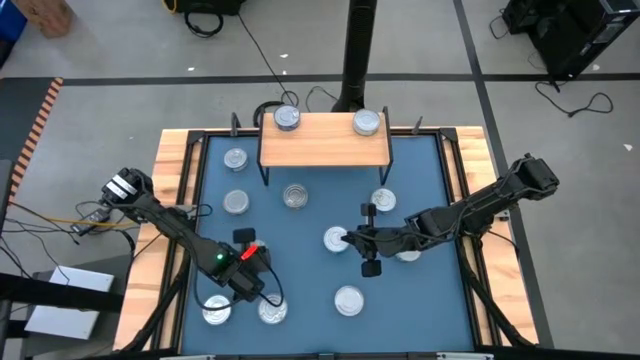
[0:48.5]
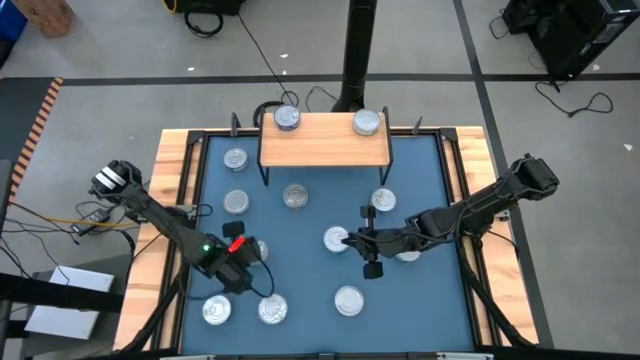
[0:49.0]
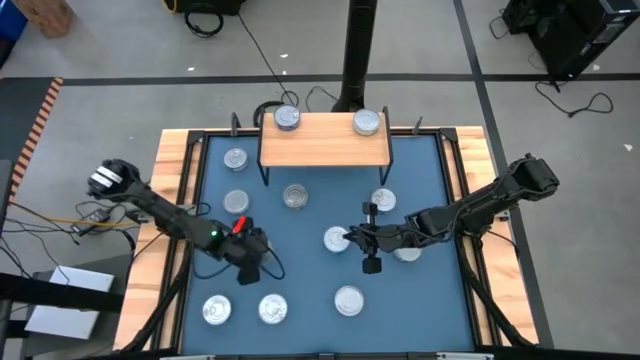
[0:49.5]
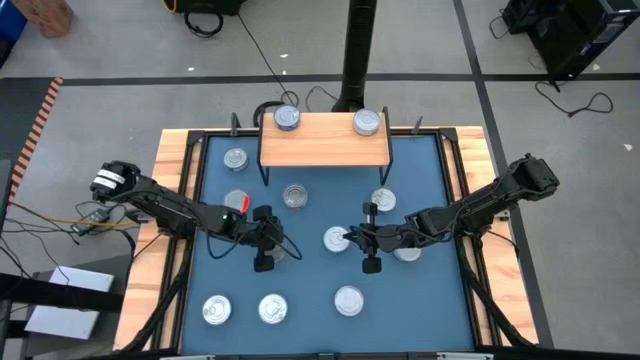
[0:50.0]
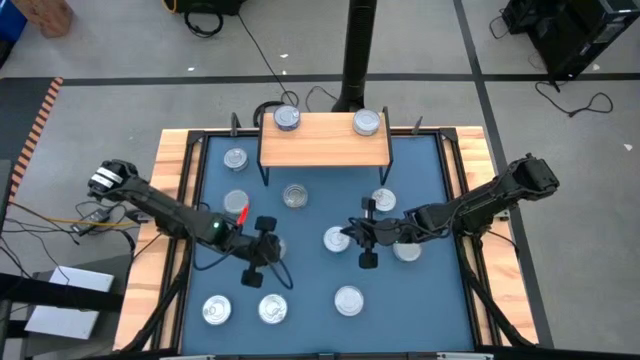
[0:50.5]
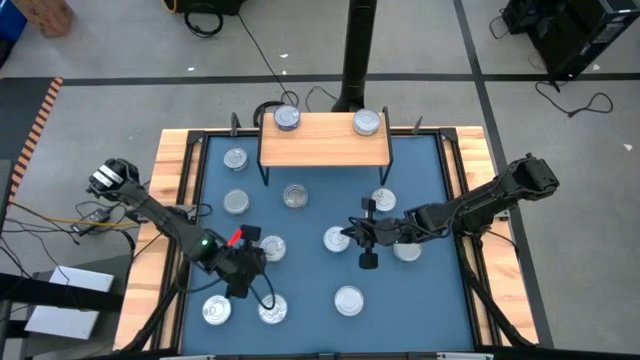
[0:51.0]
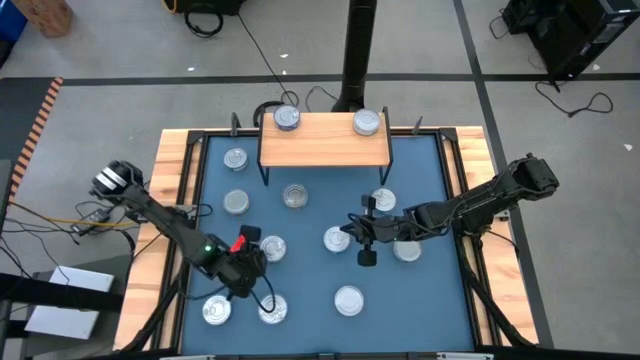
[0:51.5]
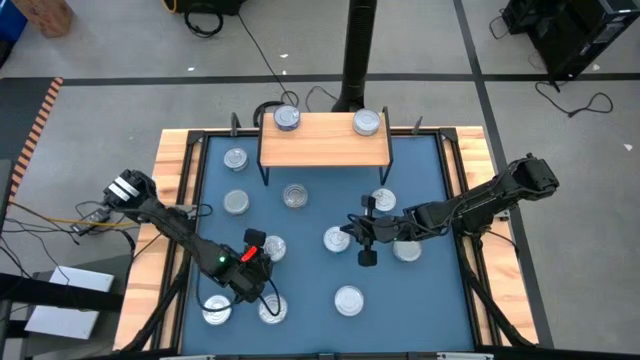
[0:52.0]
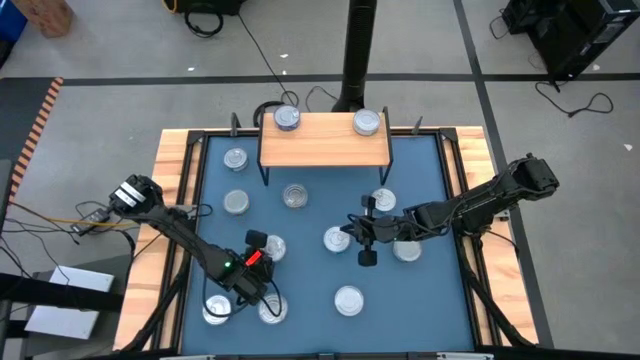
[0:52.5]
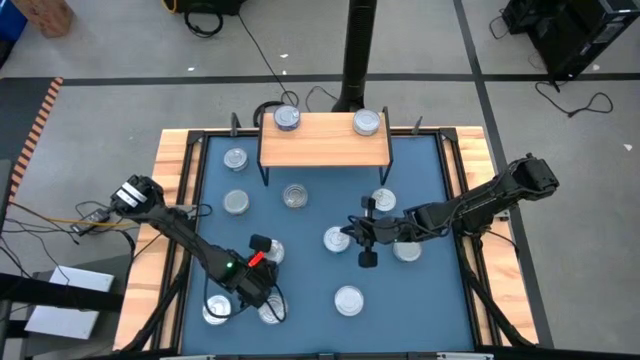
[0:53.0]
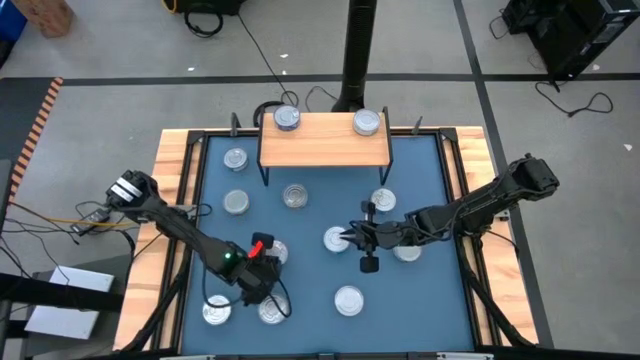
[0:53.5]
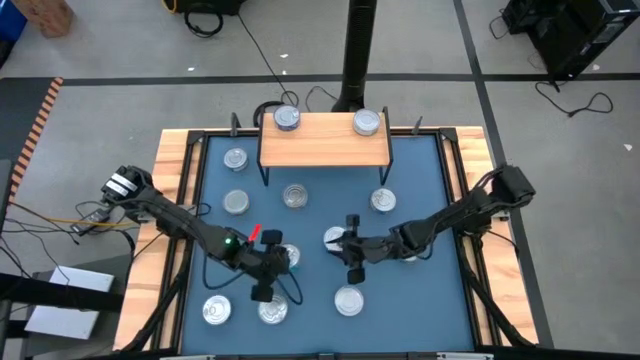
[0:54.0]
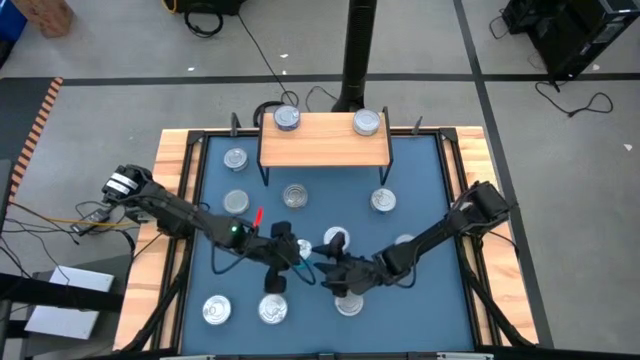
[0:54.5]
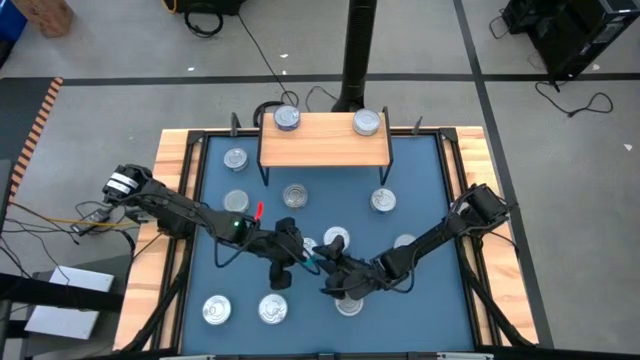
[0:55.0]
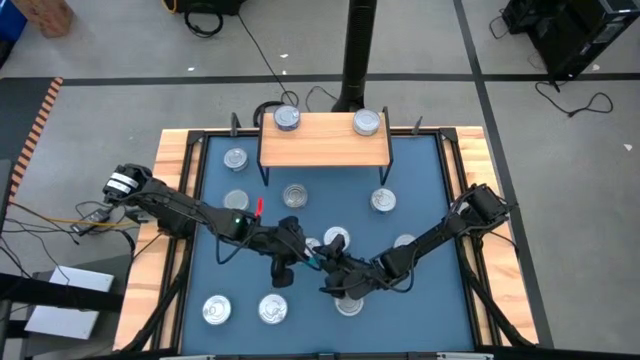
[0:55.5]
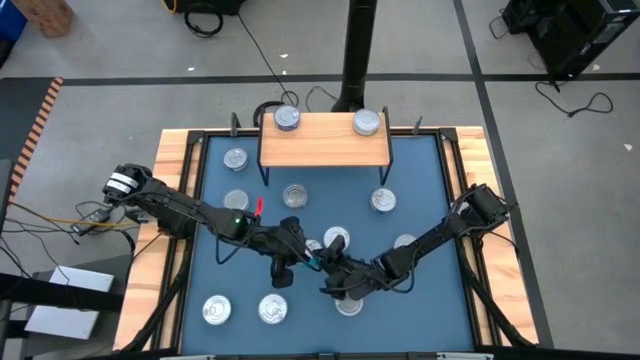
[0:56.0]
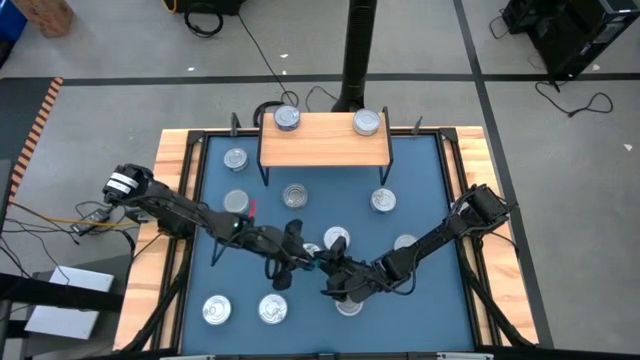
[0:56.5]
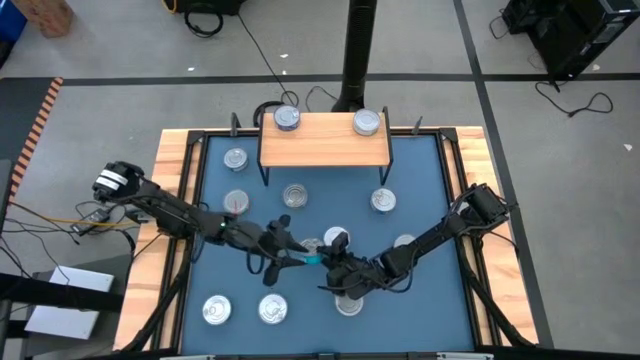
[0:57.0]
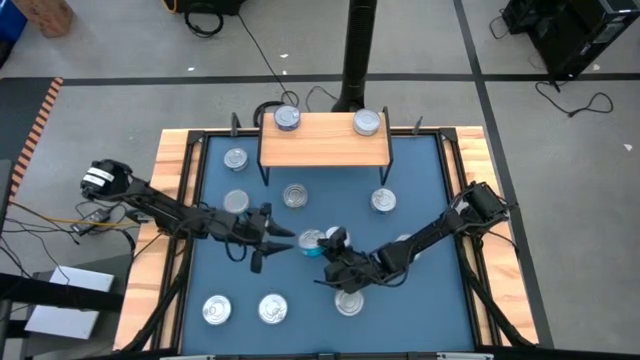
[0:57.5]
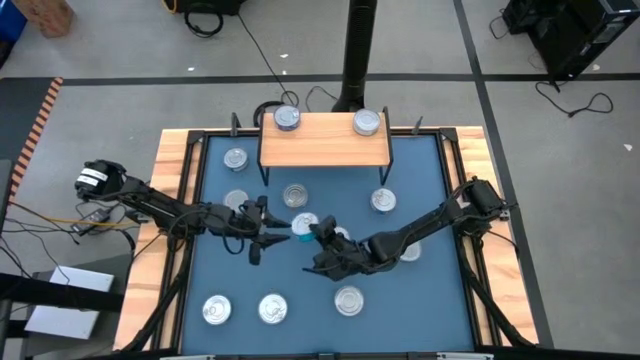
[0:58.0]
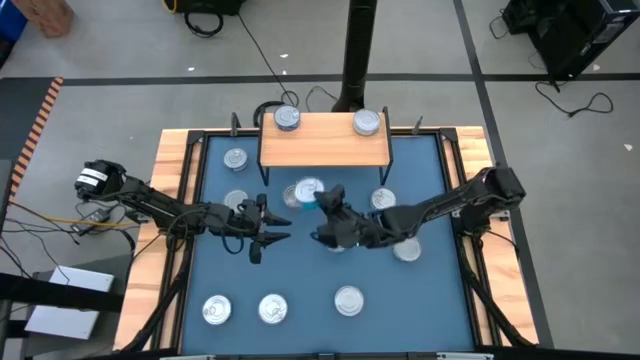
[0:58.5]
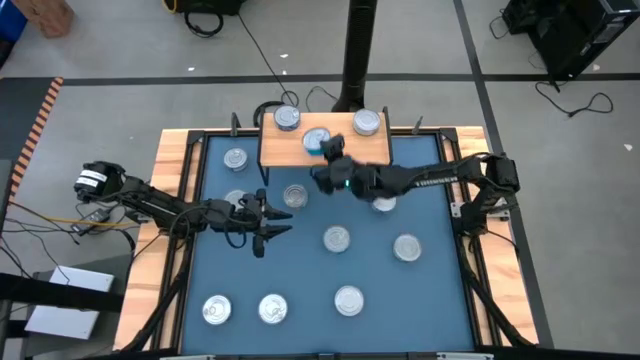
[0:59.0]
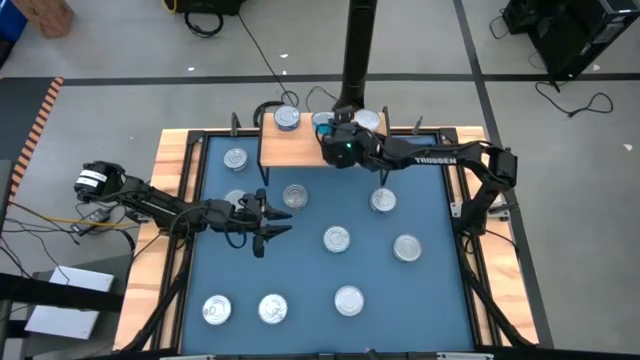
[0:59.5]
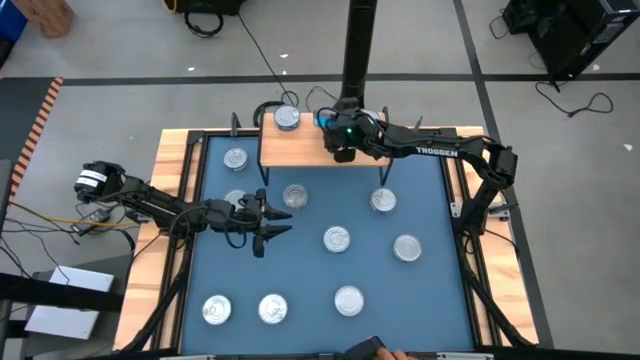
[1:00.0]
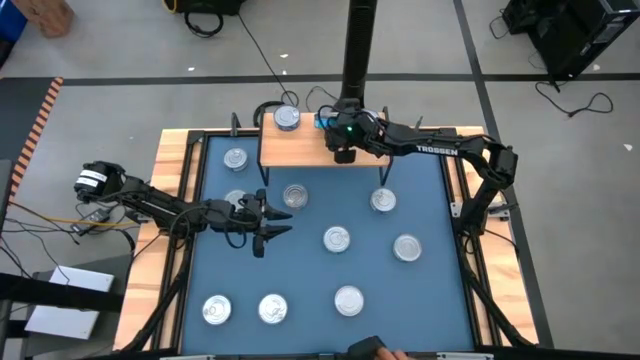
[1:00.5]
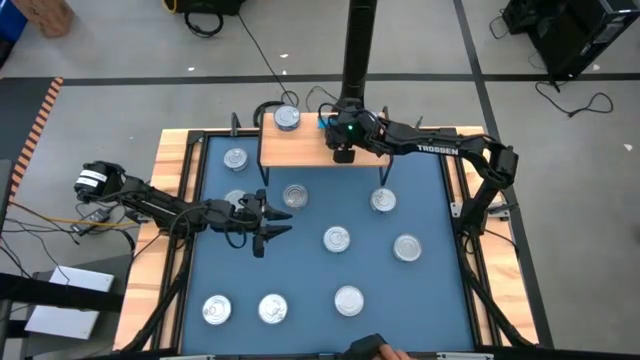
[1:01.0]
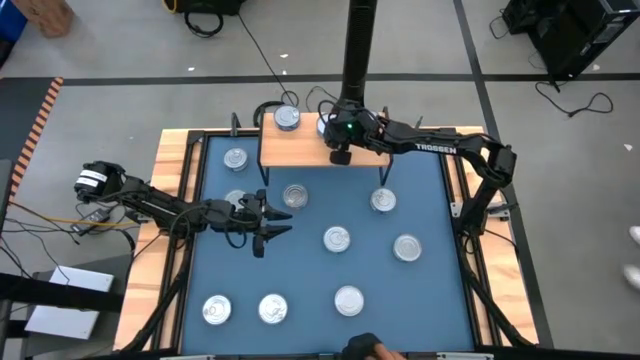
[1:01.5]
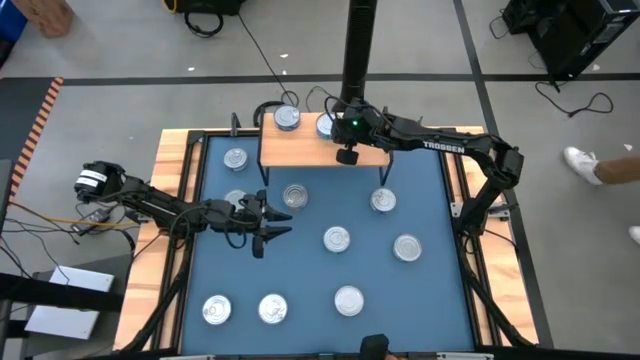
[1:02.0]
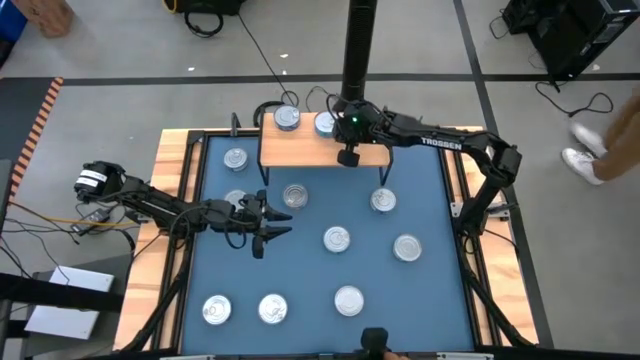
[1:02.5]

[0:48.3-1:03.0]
Task: Stack canned seafood by type on shelf
Put the light blue tuna can on the shelf

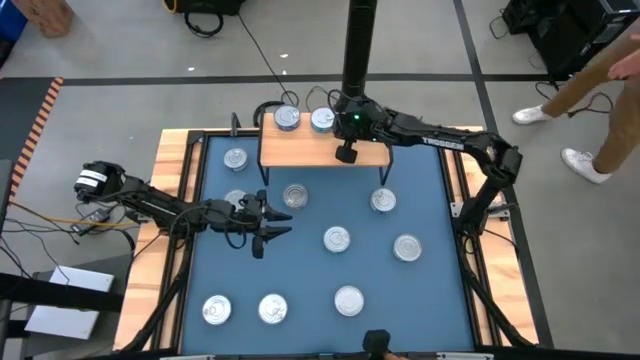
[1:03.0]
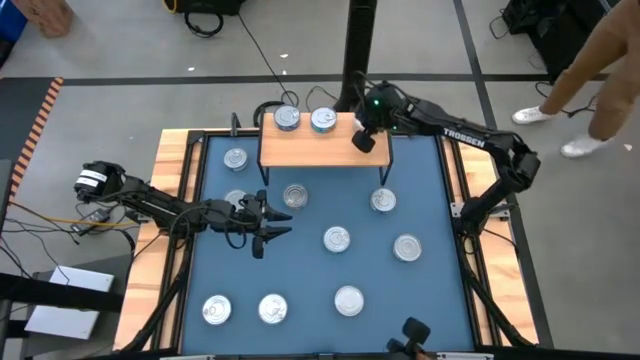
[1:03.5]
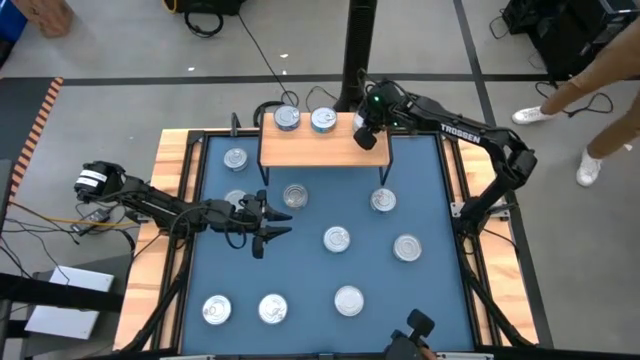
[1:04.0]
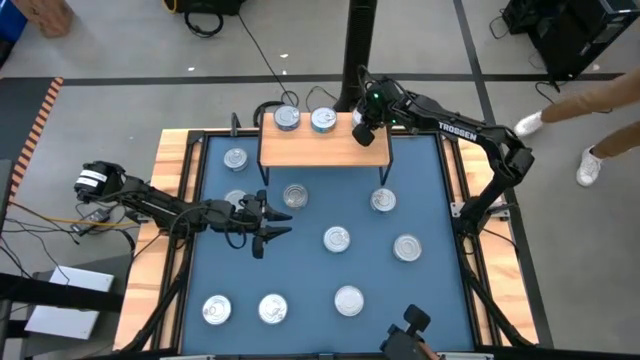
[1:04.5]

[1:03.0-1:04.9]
Adjust the green tuna can on the shelf

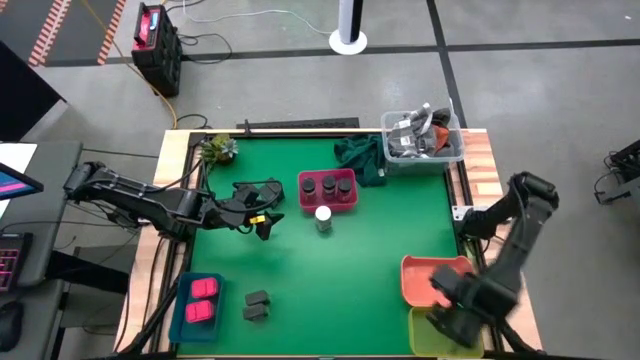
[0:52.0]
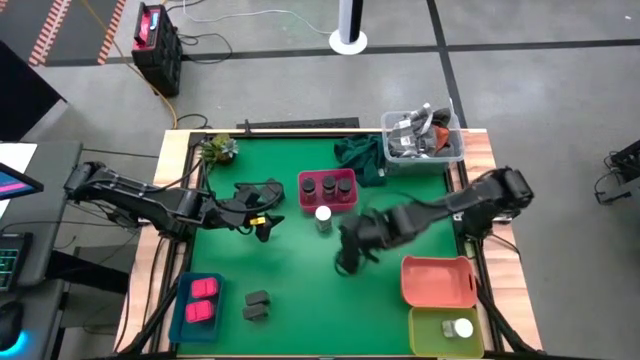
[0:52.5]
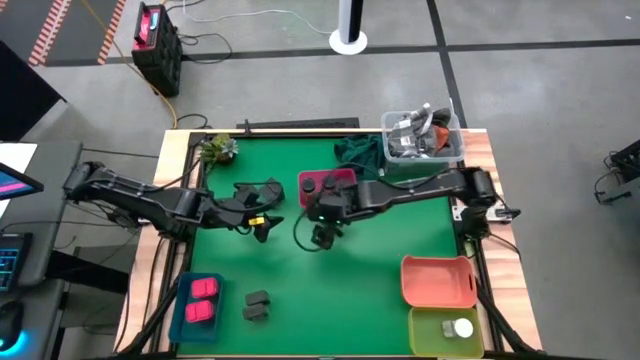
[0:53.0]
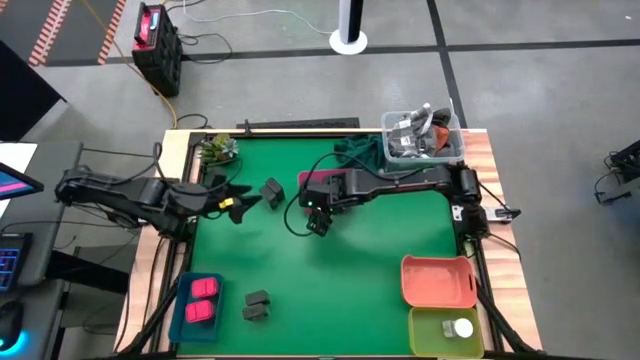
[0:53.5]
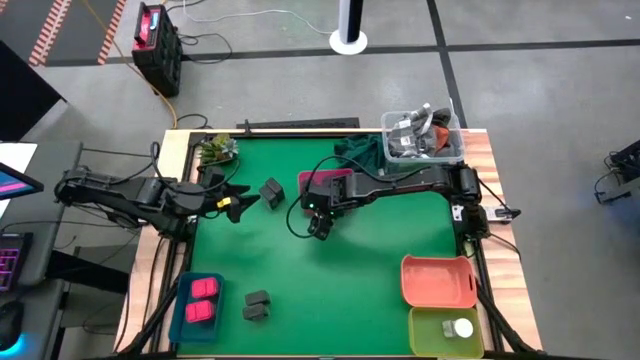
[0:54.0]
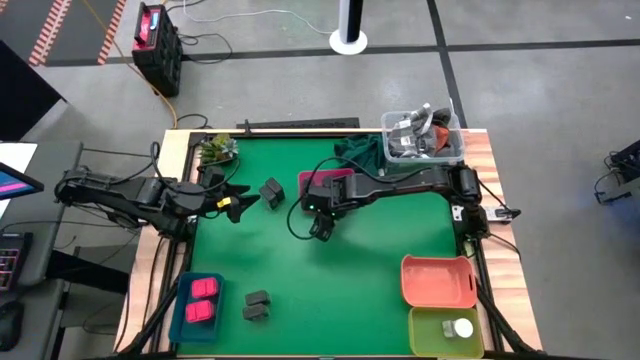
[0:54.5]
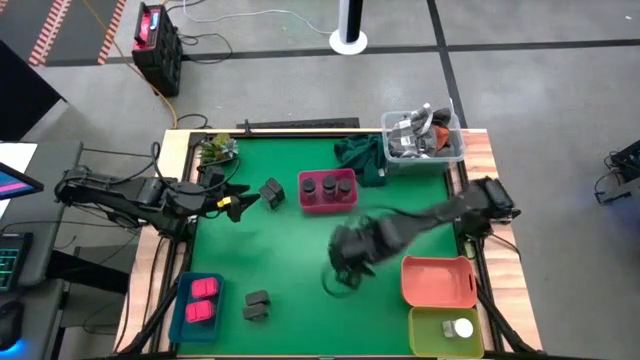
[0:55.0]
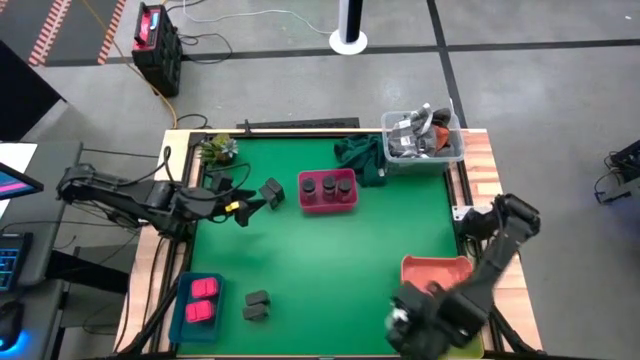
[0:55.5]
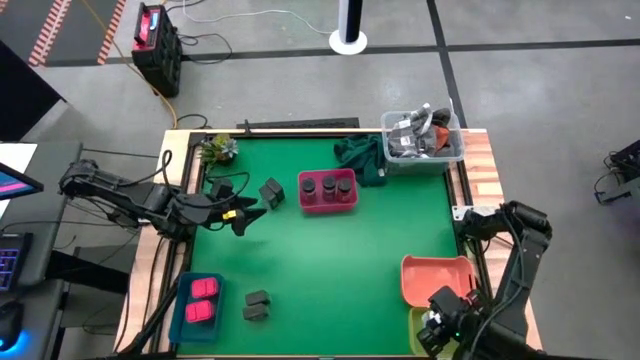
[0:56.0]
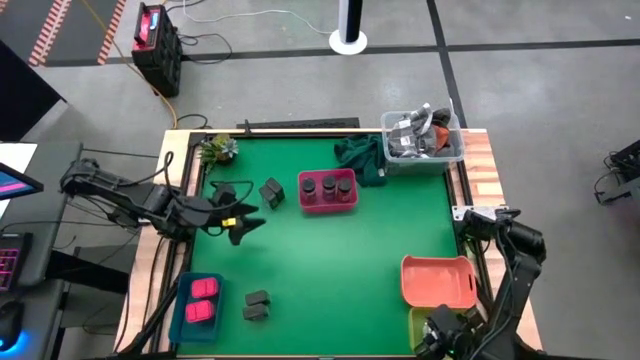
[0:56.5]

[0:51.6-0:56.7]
Task: Sort spices by type
Put the white seasoning bottle into the yellow bin
